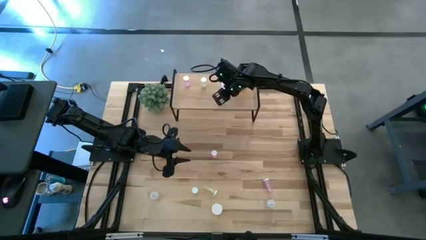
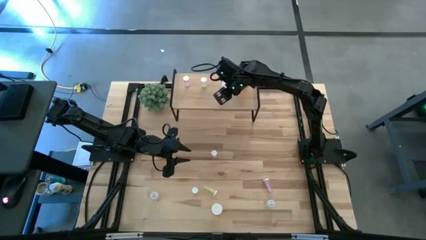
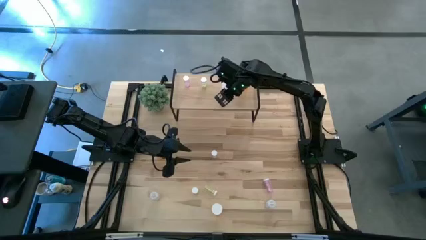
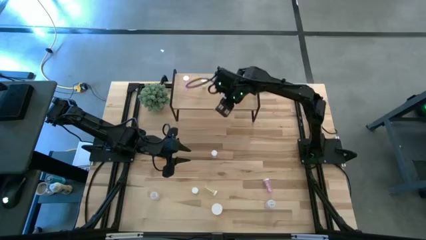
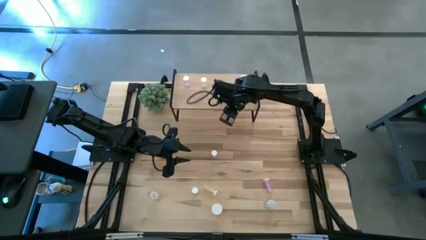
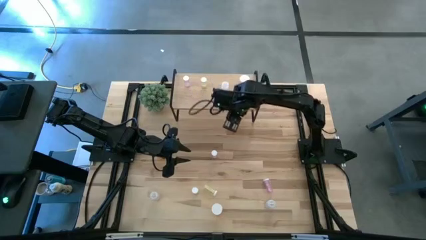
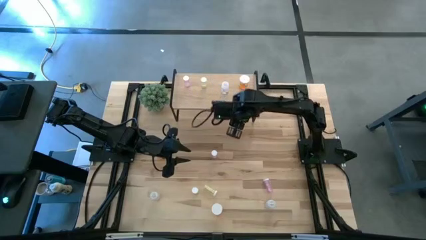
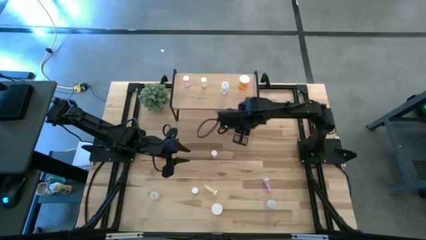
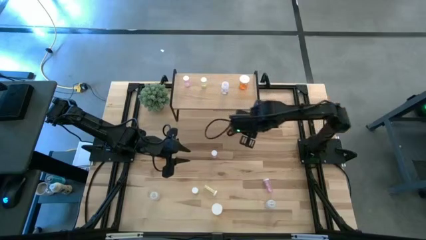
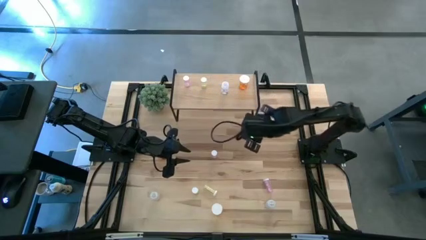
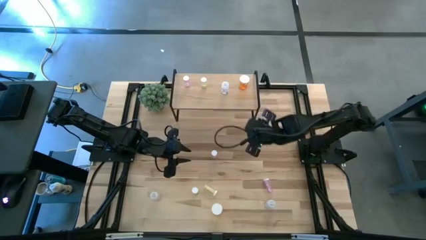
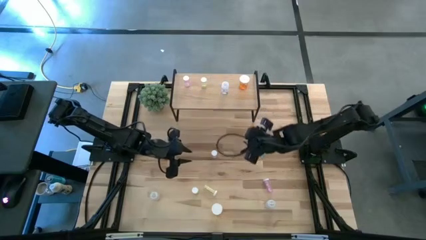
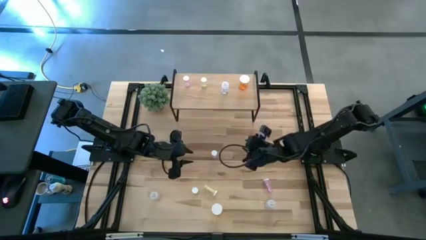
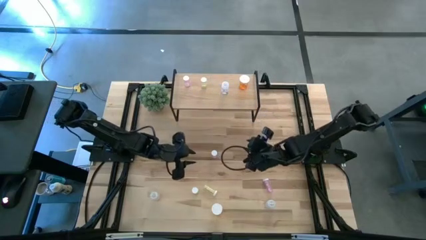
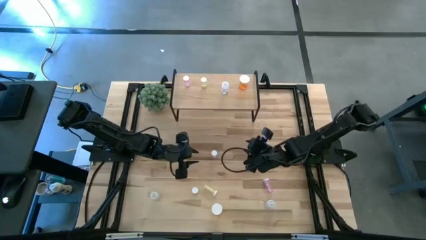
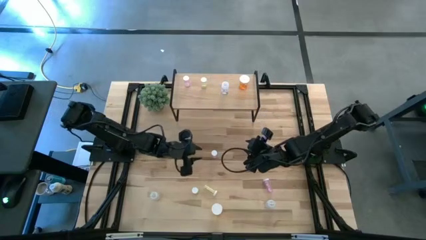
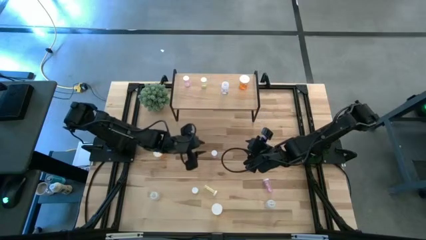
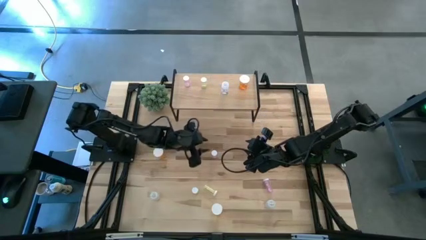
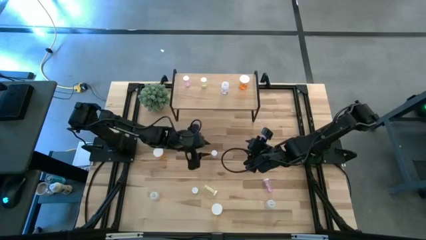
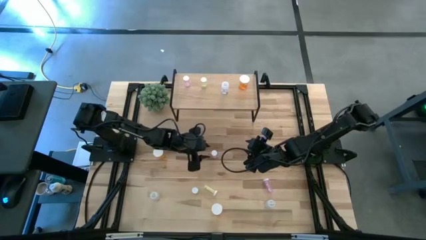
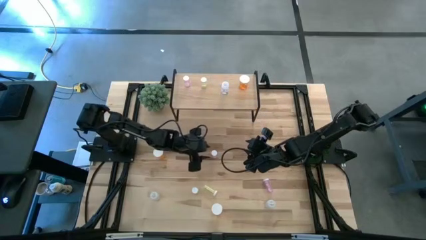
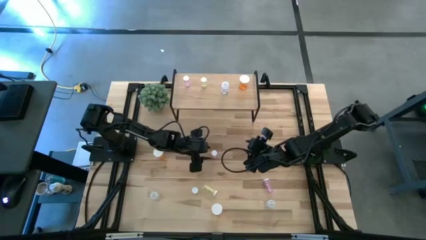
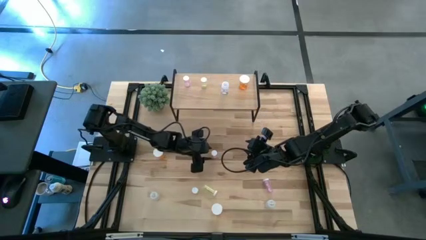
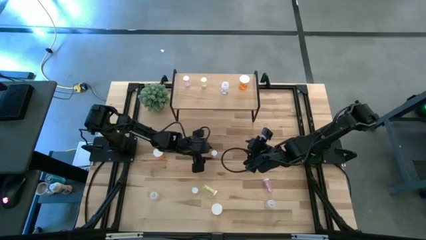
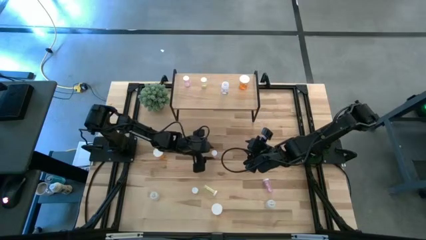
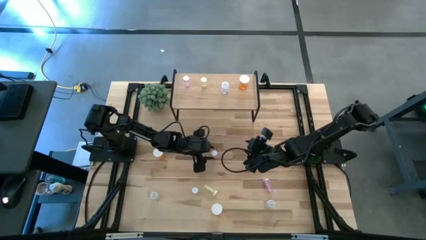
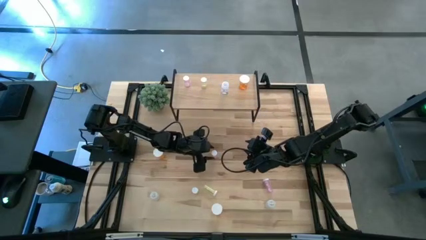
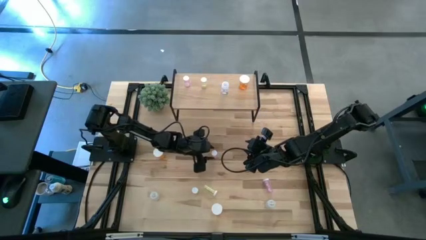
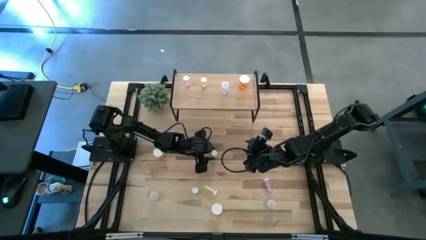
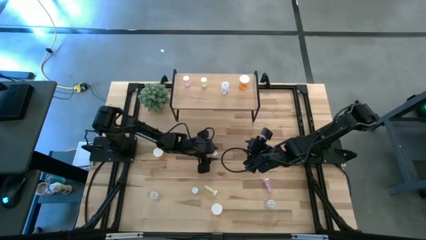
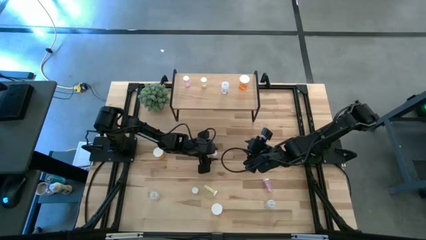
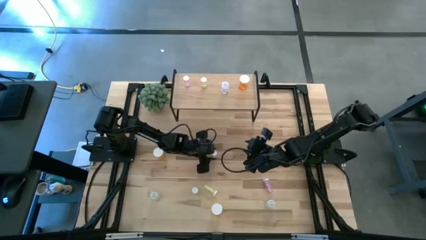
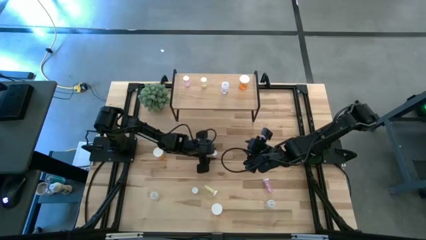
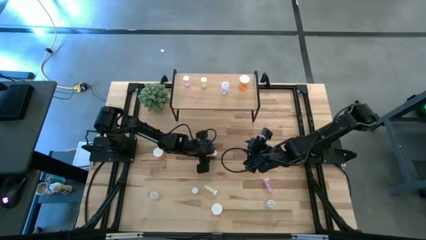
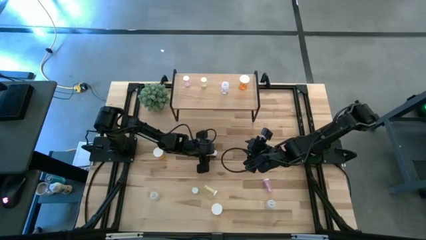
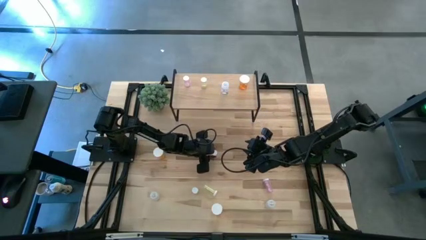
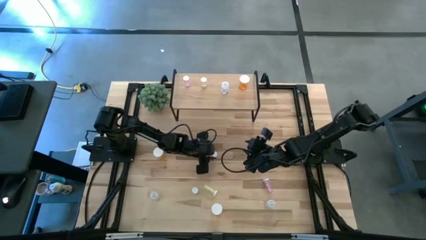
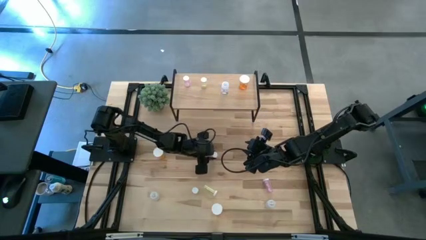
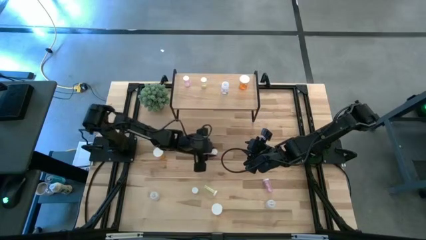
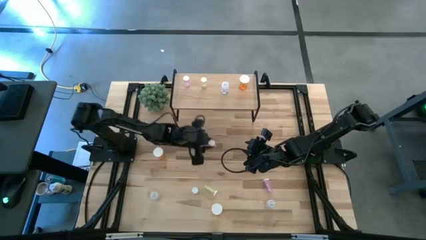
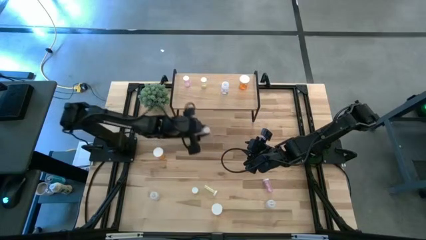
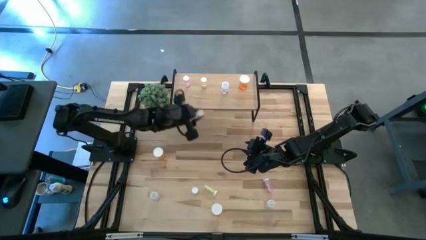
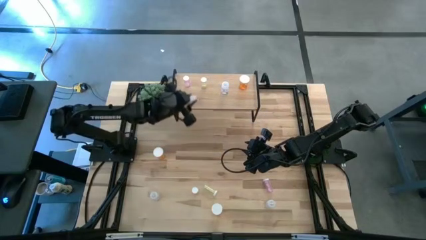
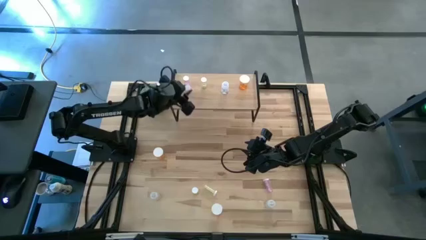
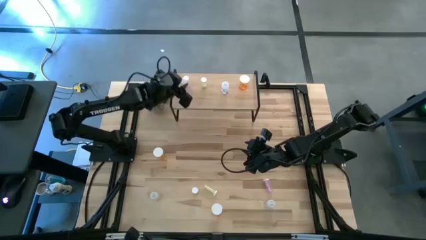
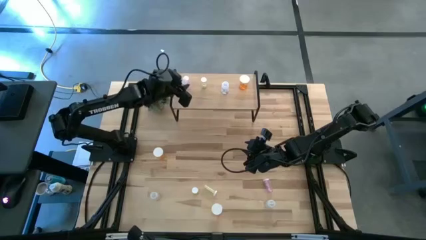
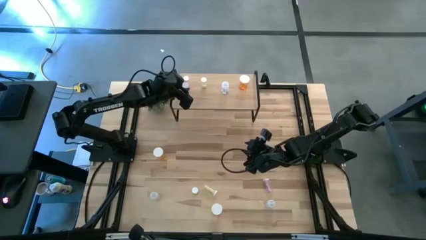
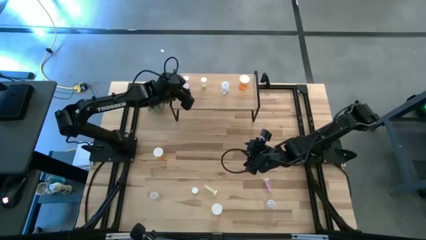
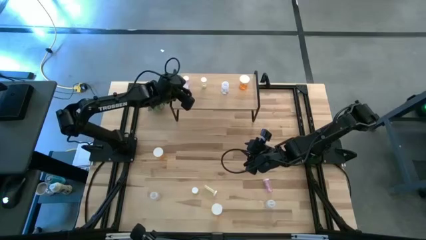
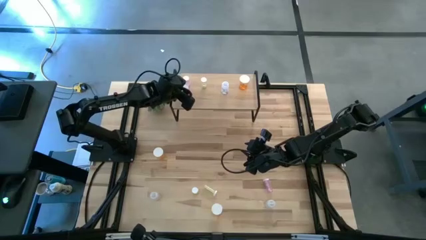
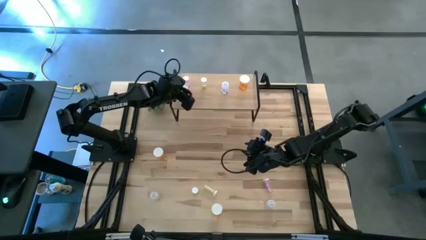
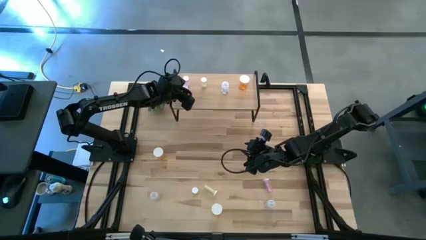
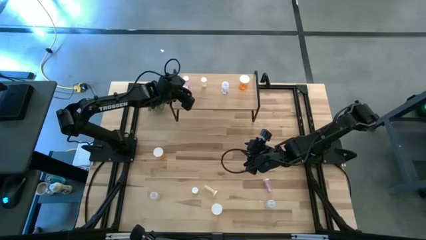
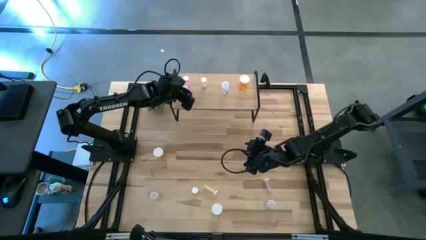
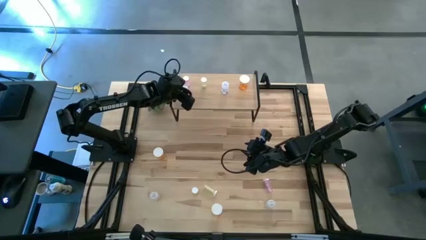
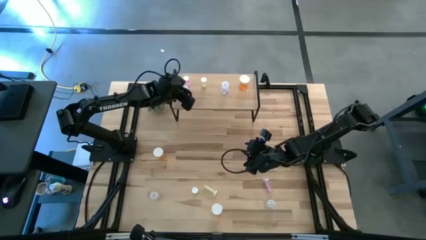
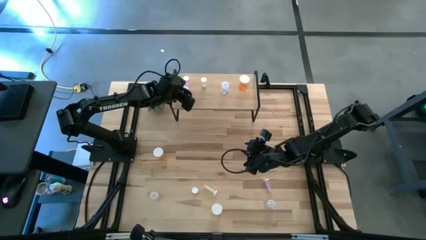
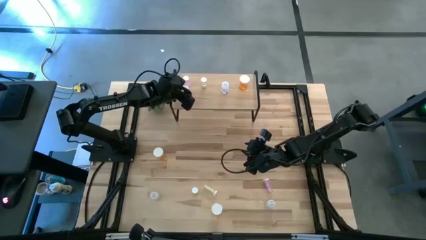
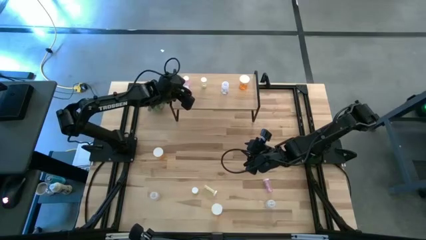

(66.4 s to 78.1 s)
Task: Pick and place medicine bottles onto shelf by color
Put the top pink pill bottle aligned with the other pink pill bottle on the shelf

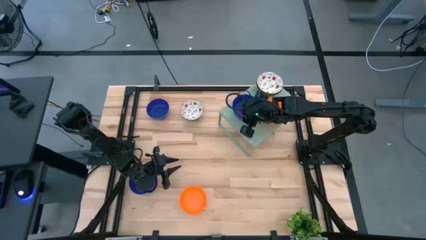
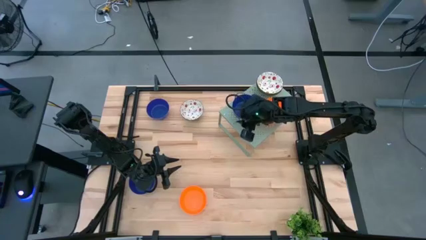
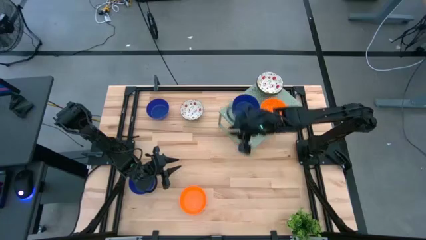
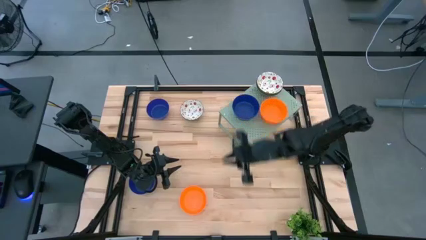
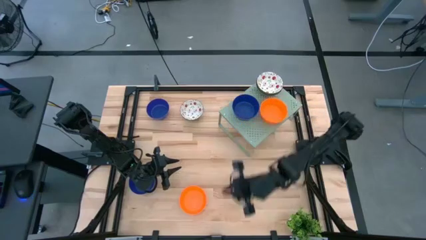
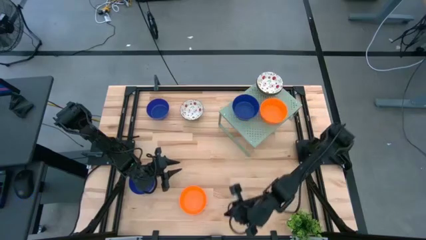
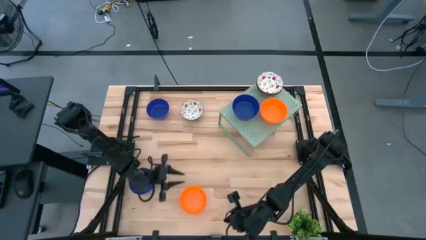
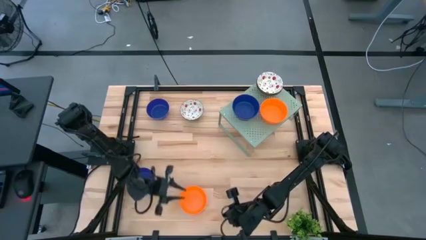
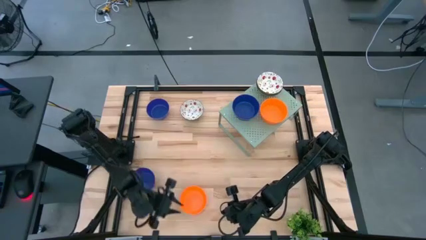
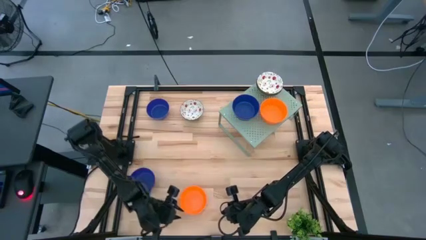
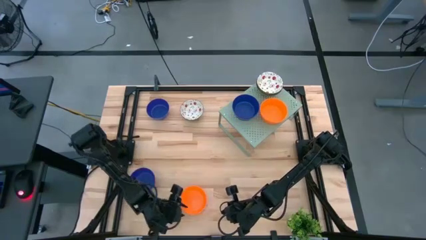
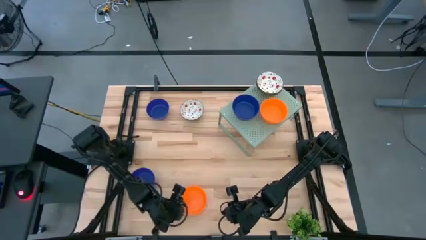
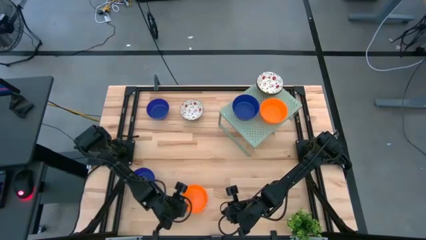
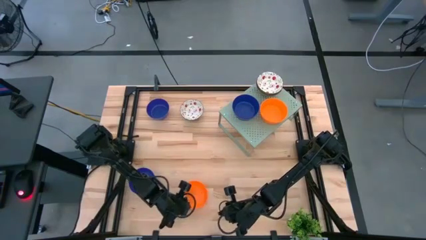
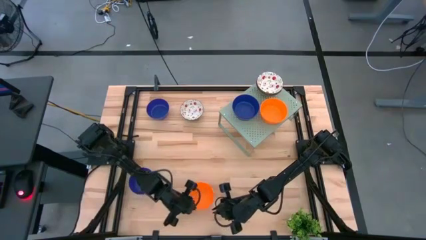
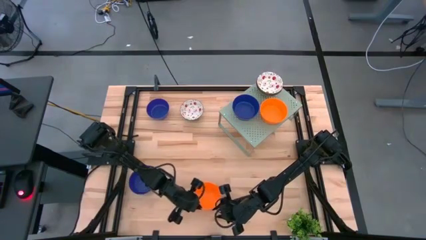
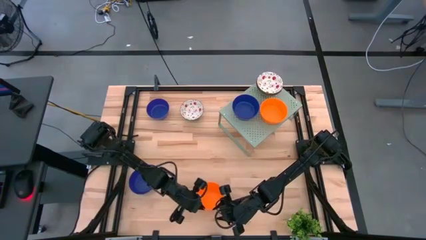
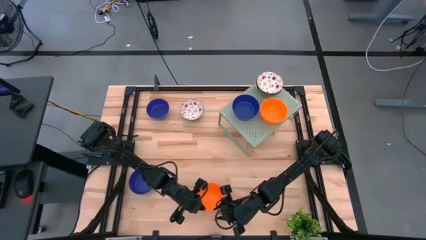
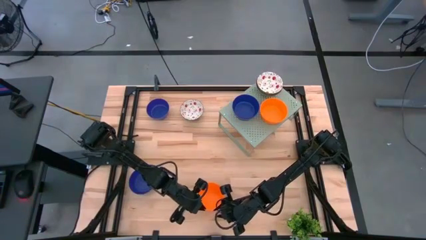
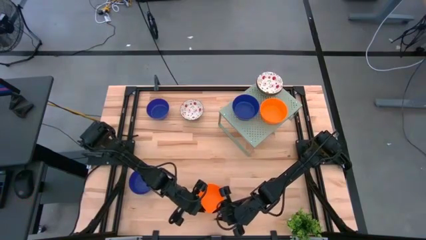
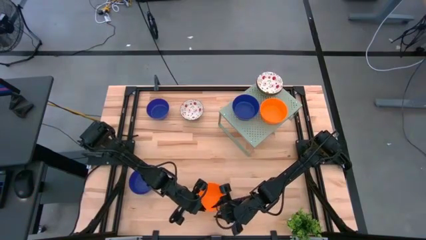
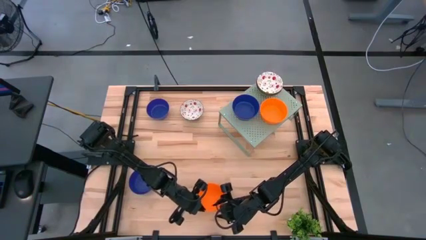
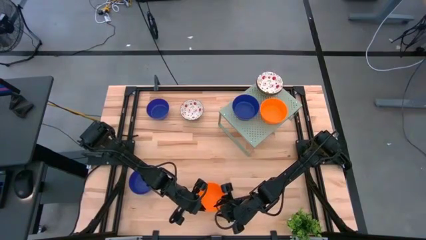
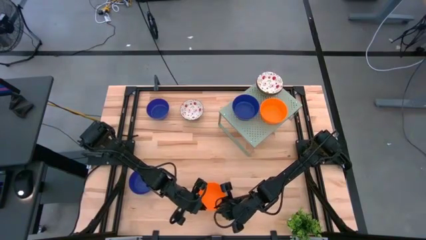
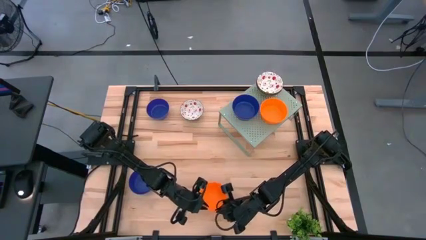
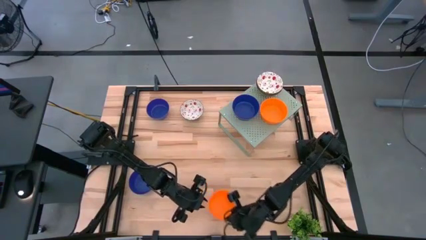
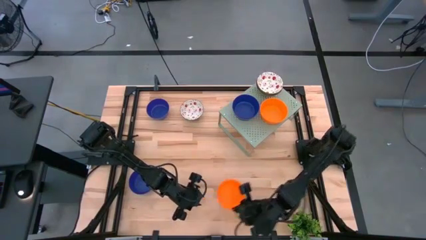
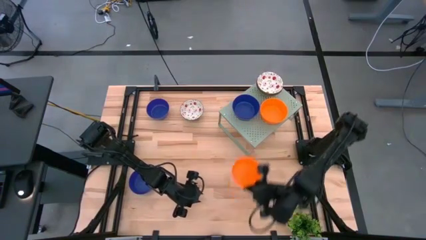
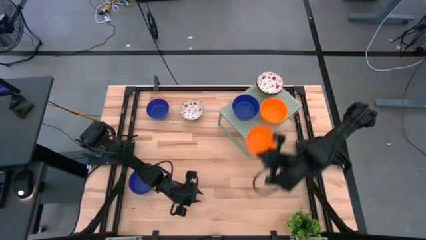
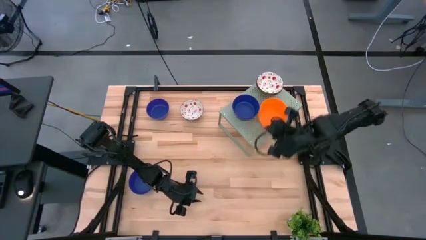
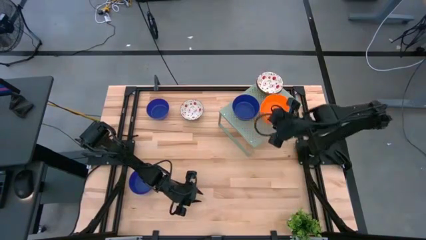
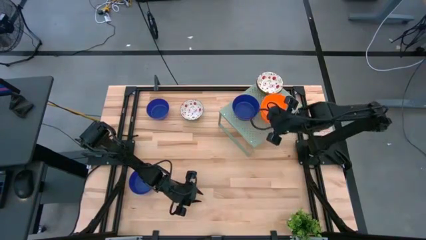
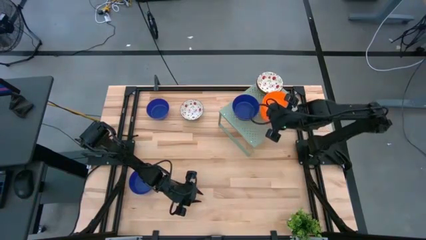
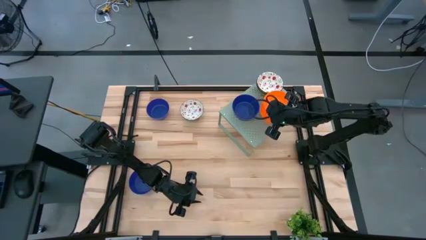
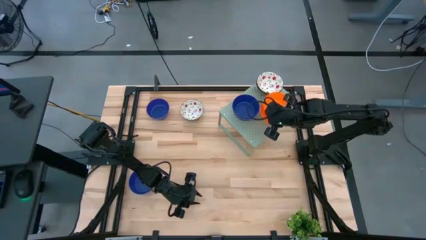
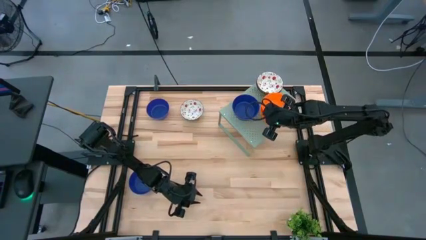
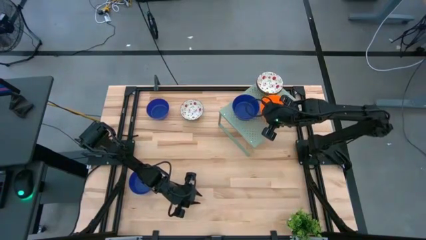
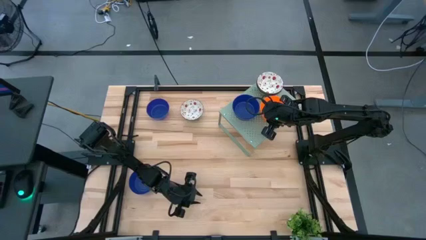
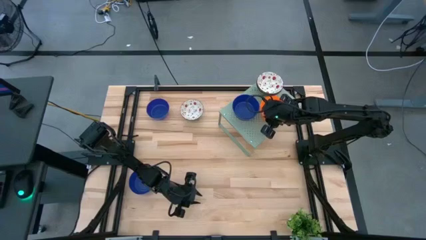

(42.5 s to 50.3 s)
Task: Pick & Place Mini bowls
Stack the orange bowl on the orange bowl on the shelf
